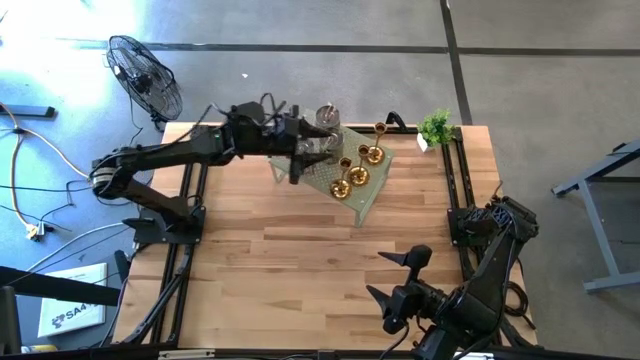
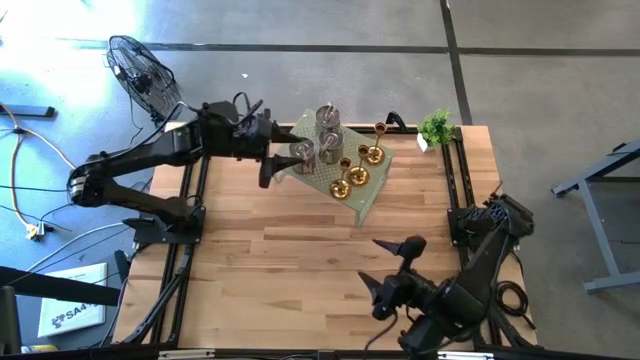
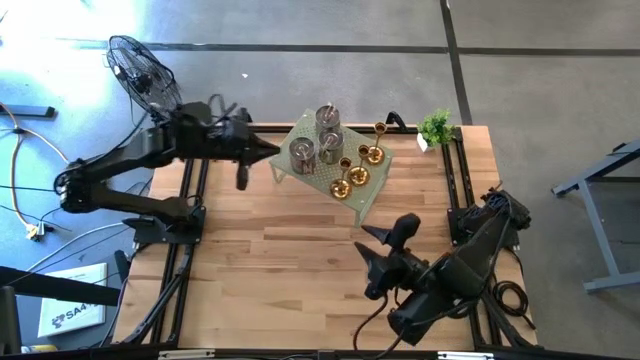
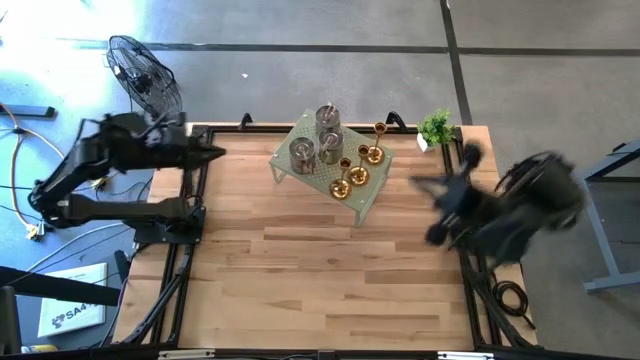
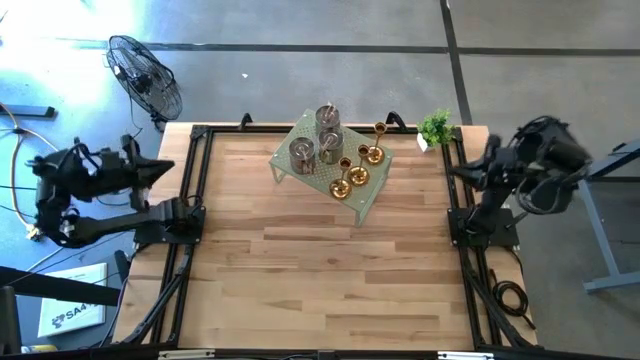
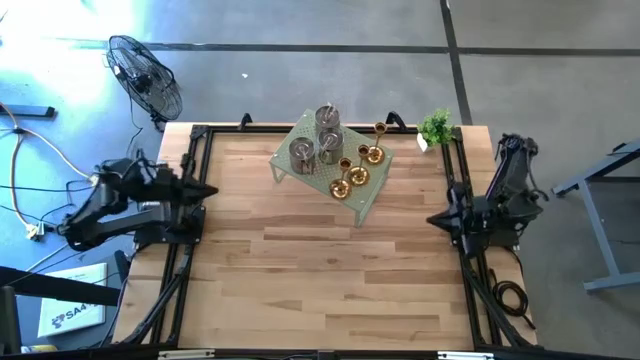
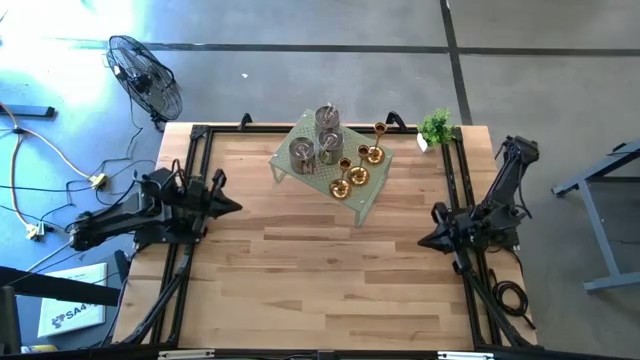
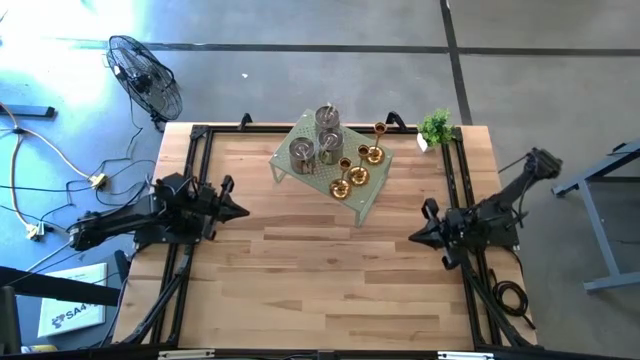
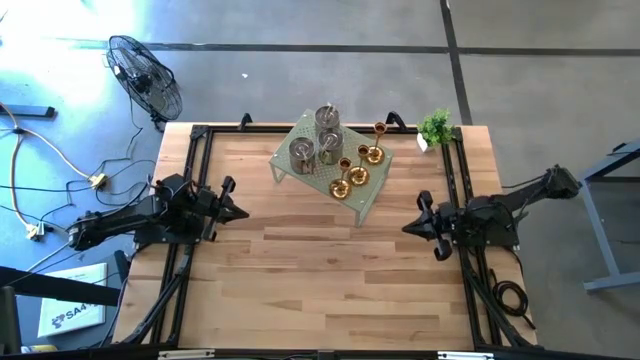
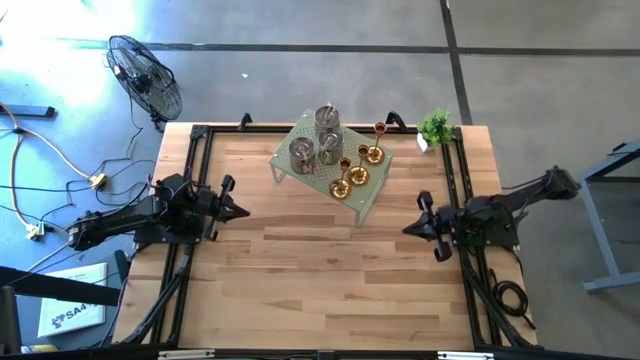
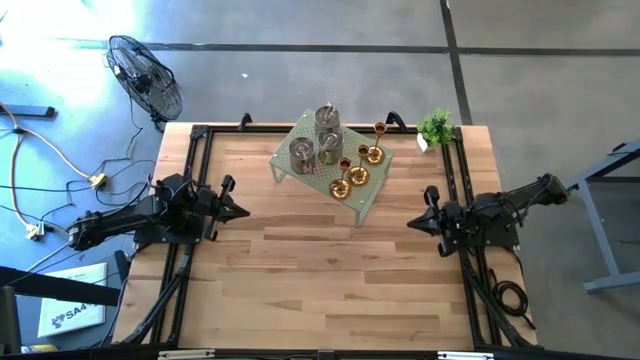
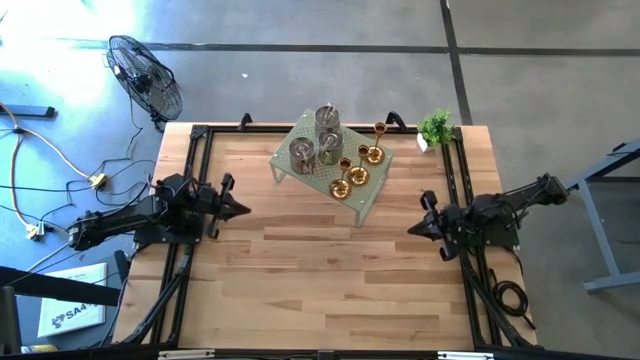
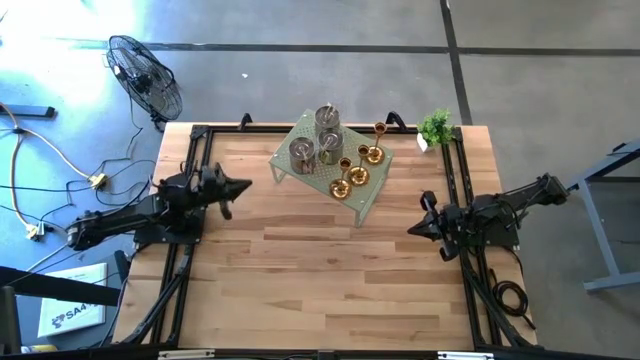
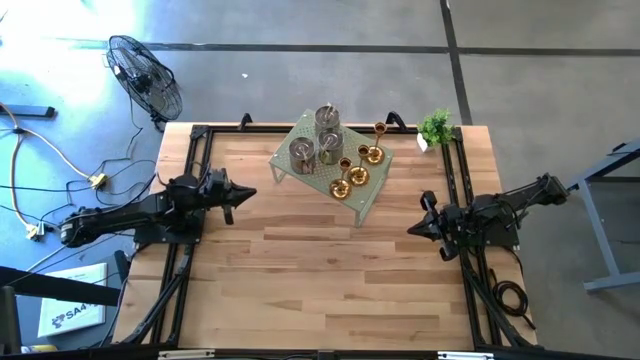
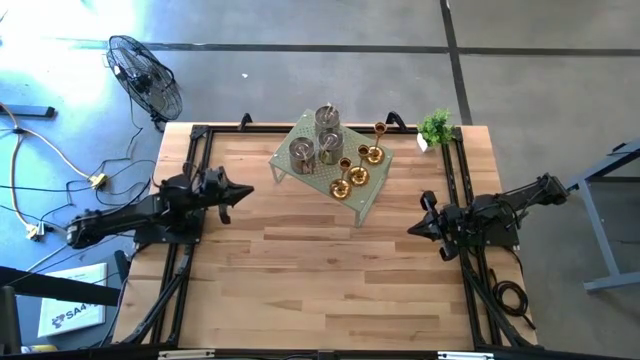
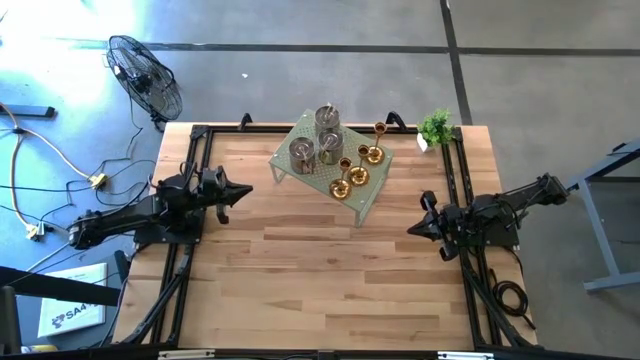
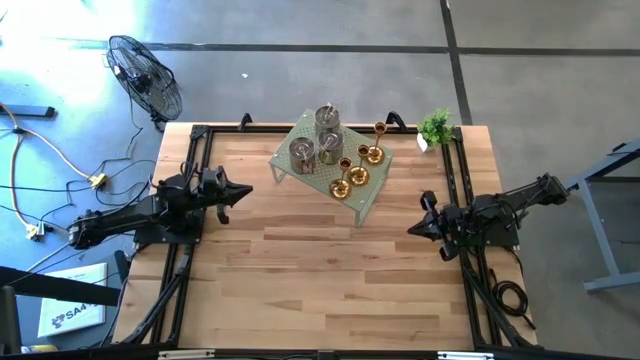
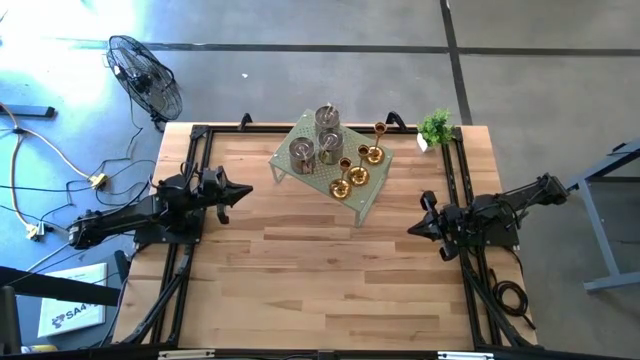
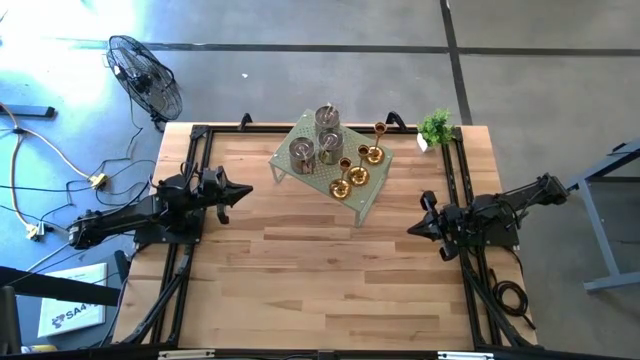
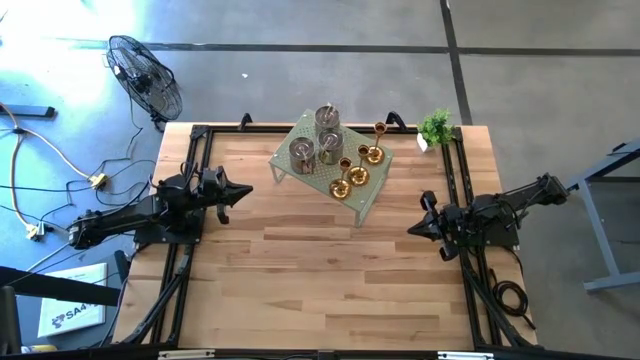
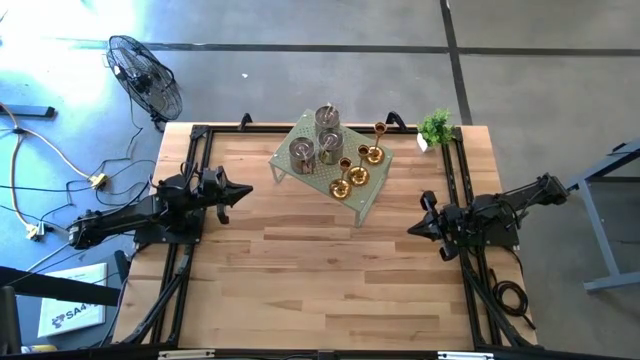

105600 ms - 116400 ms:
Task: Pick & Place candle stick holders
Return to Home Position

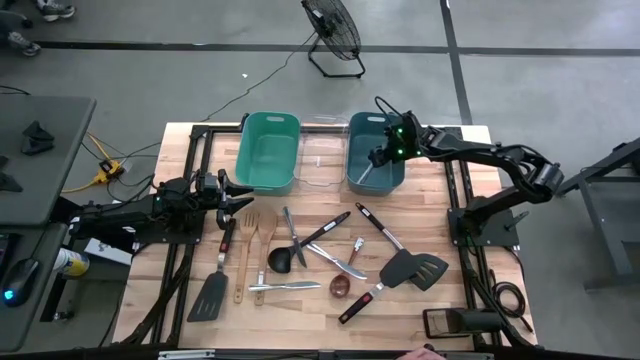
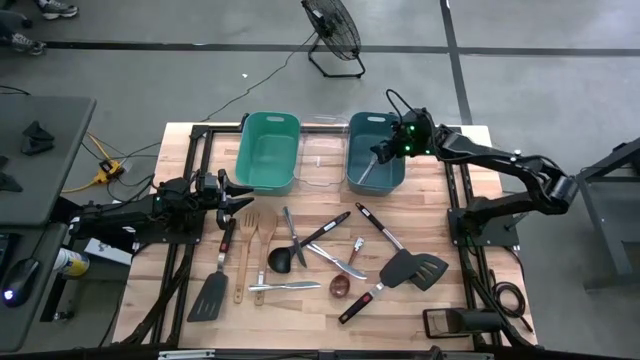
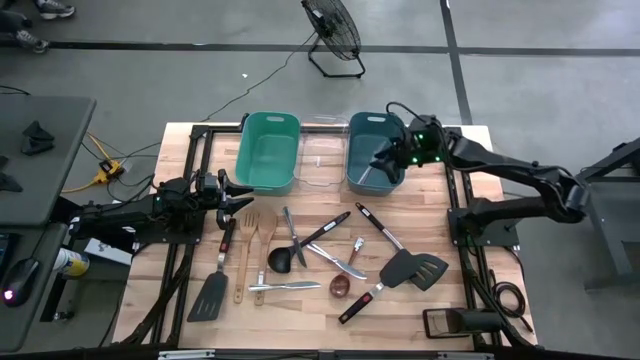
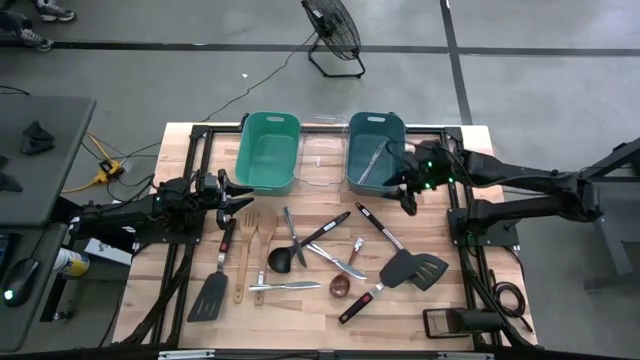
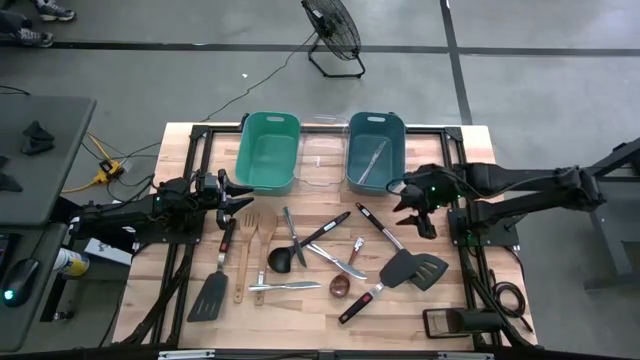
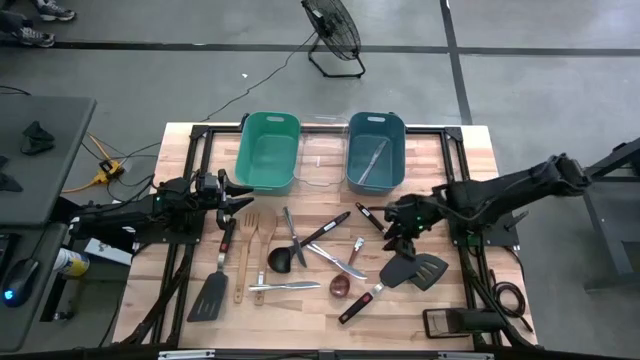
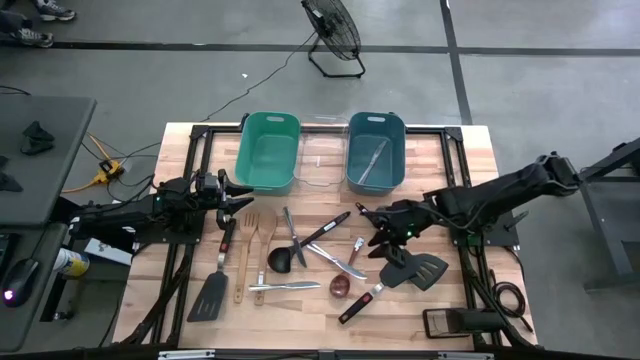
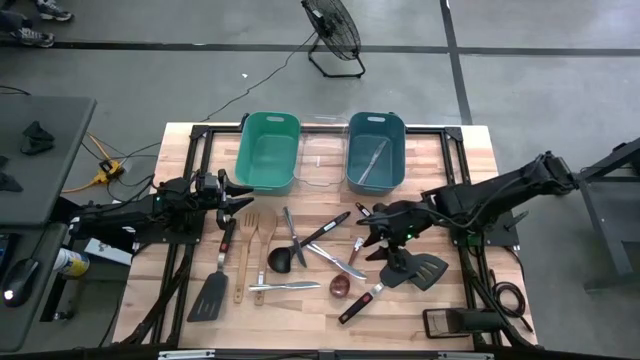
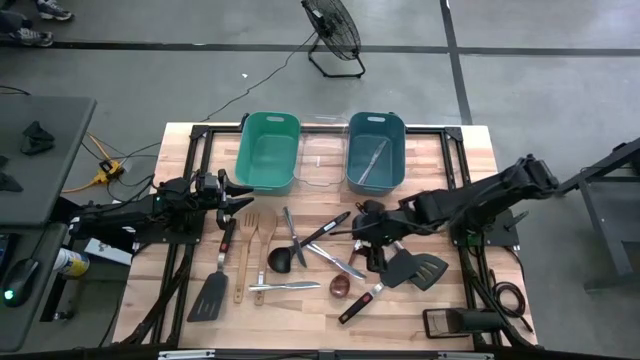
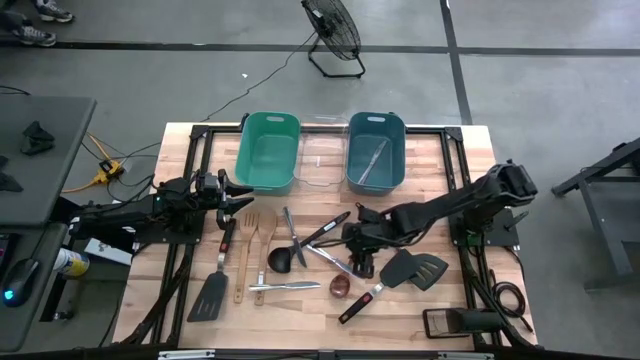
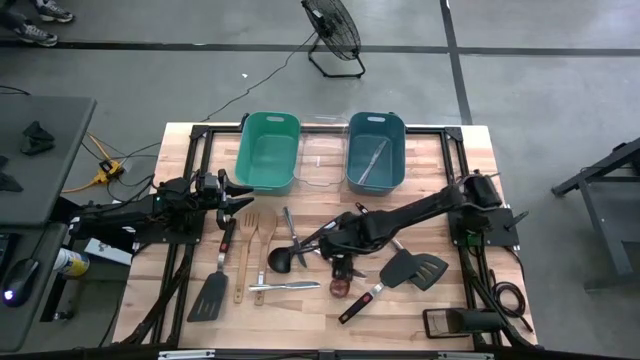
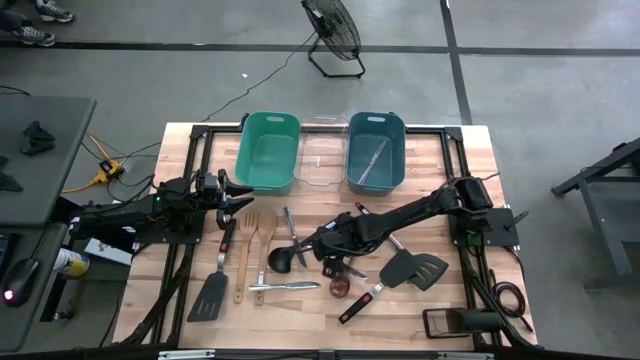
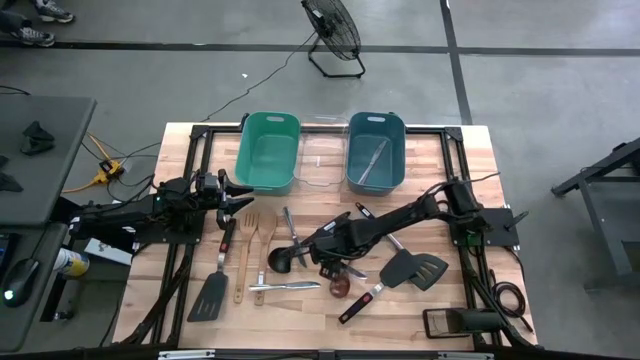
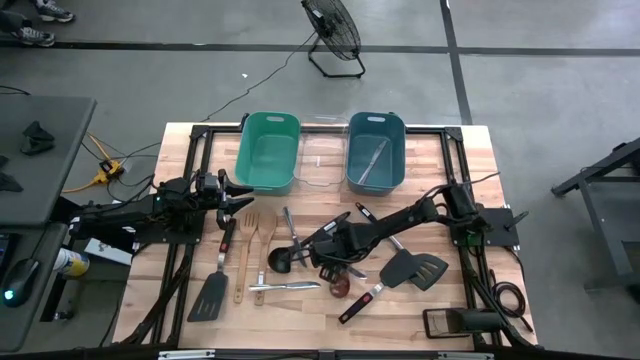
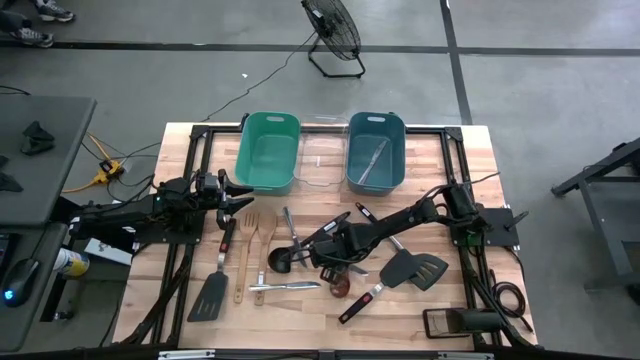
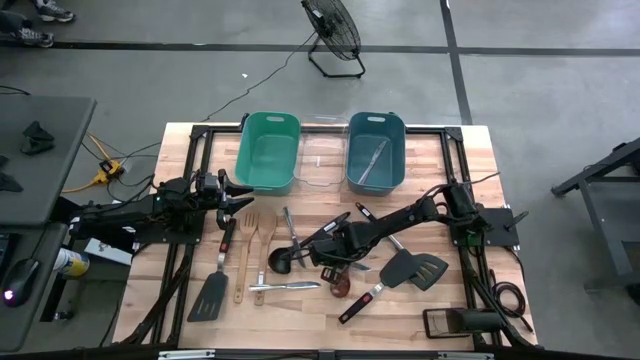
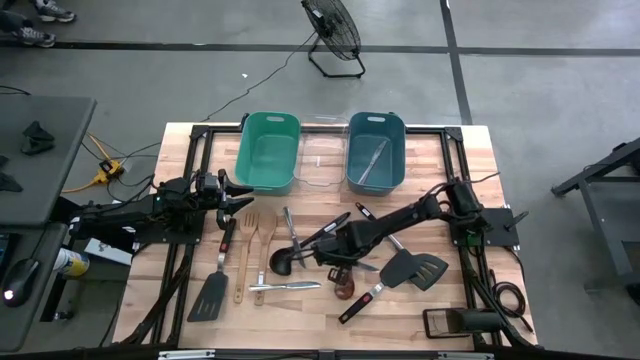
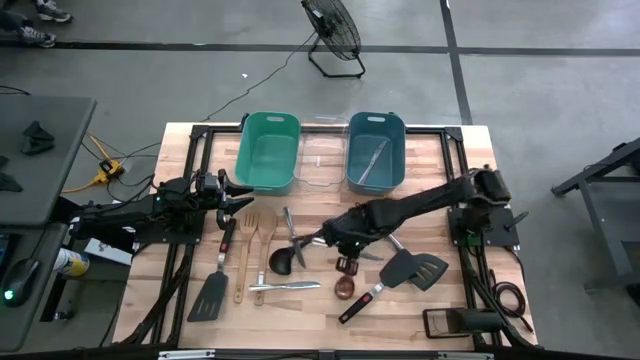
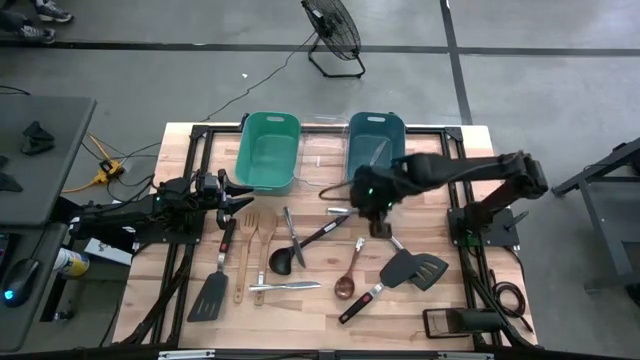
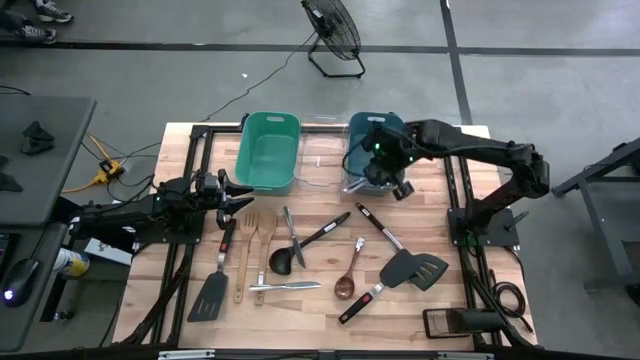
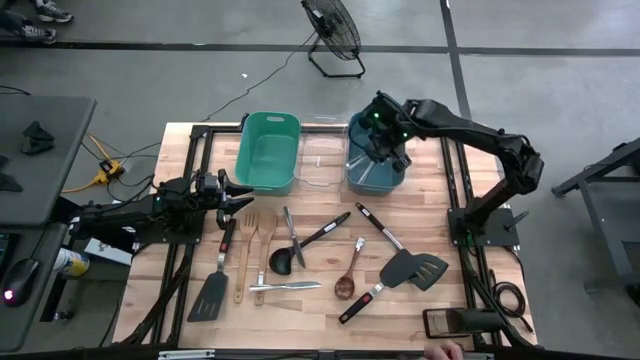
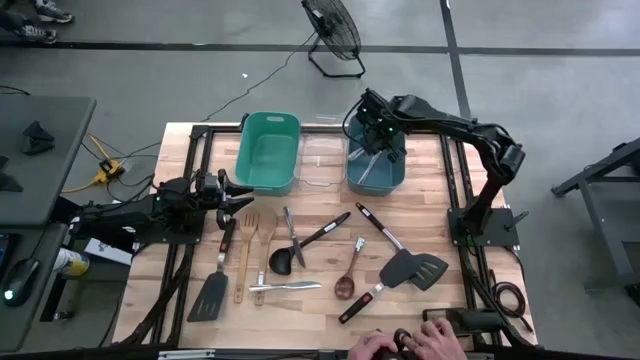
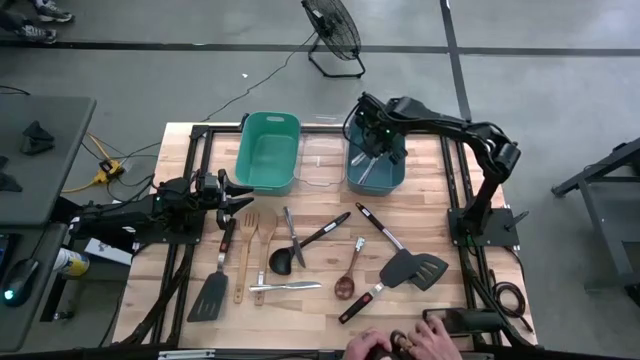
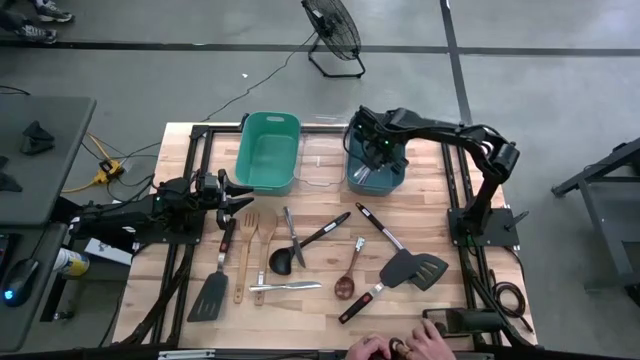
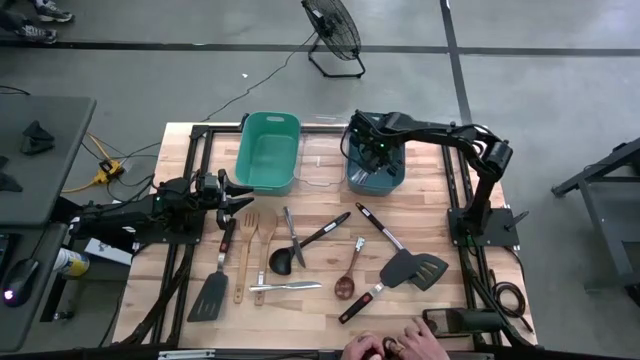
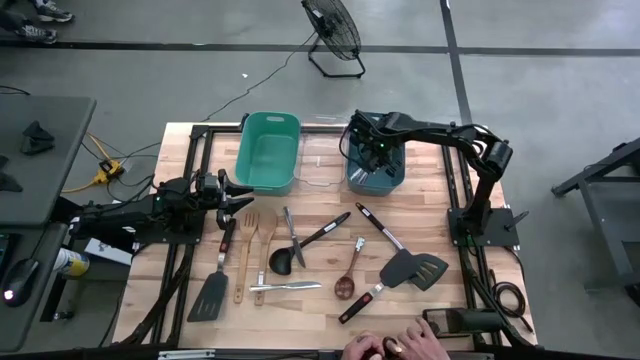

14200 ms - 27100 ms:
Task: Pick & Place Kitchen Items
Put the silver table knife into the blue bin
